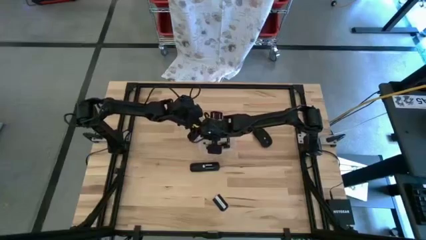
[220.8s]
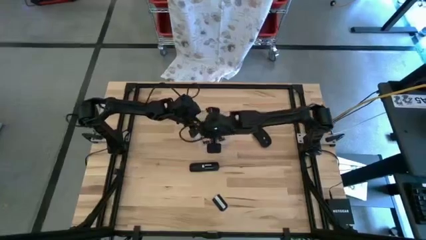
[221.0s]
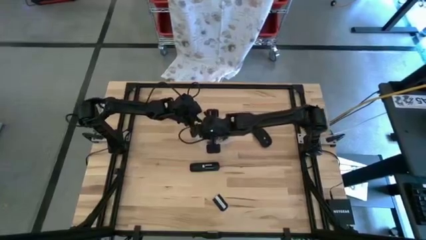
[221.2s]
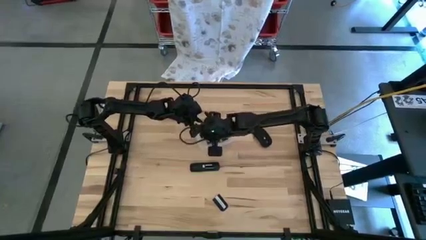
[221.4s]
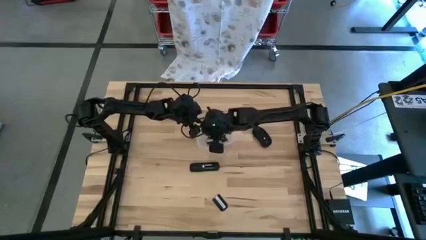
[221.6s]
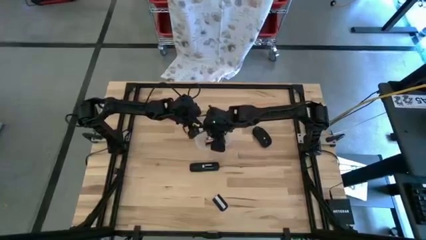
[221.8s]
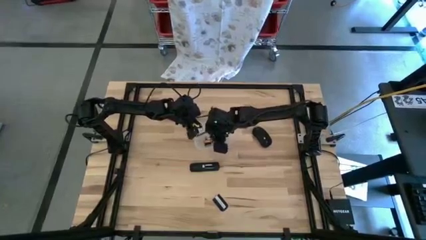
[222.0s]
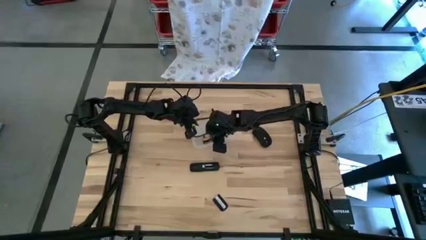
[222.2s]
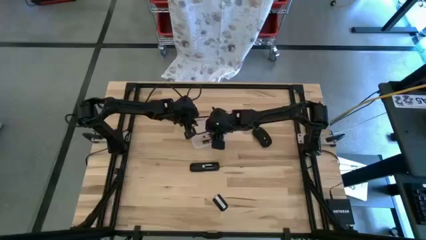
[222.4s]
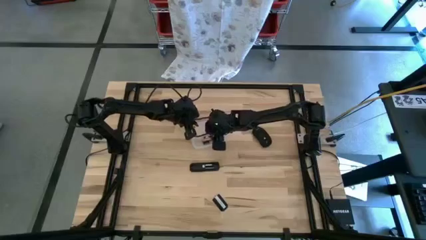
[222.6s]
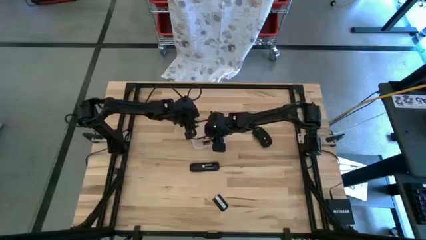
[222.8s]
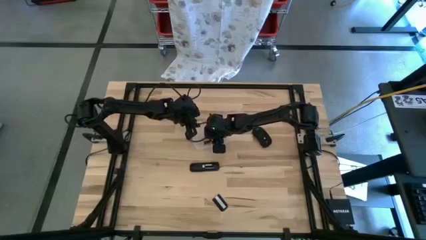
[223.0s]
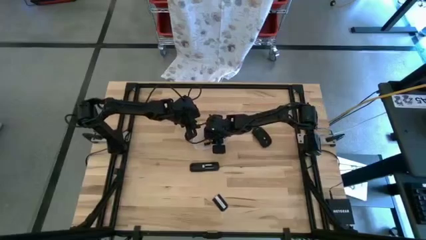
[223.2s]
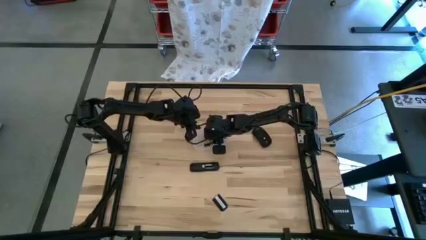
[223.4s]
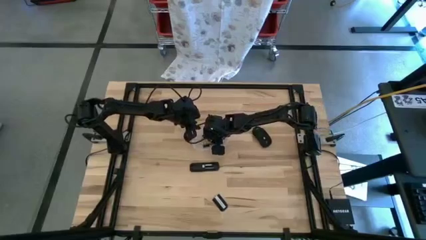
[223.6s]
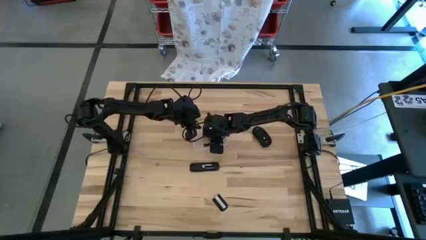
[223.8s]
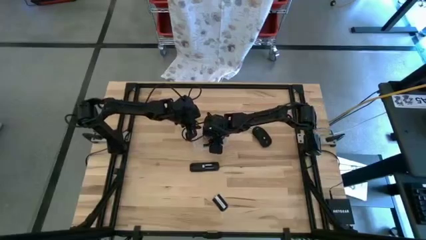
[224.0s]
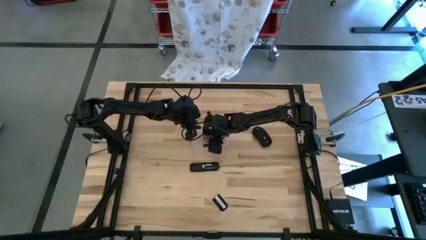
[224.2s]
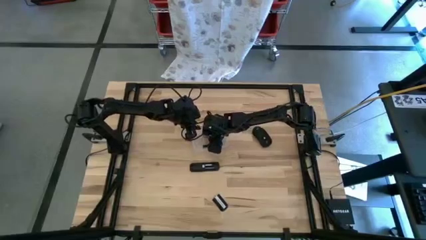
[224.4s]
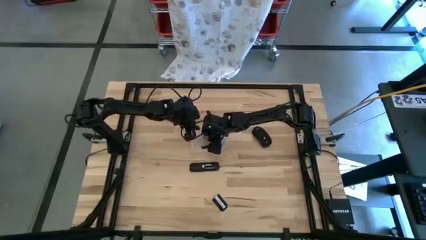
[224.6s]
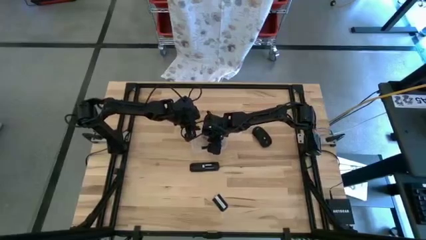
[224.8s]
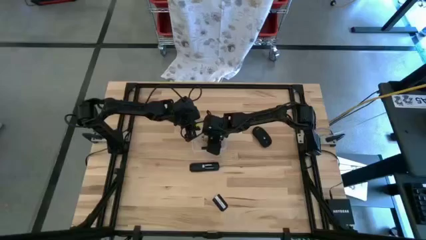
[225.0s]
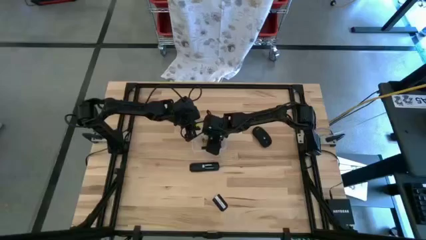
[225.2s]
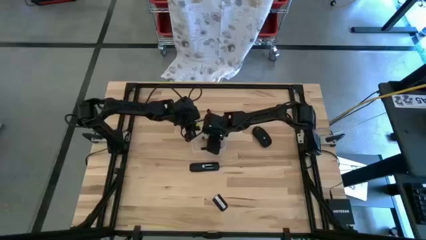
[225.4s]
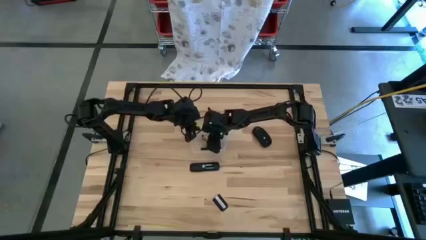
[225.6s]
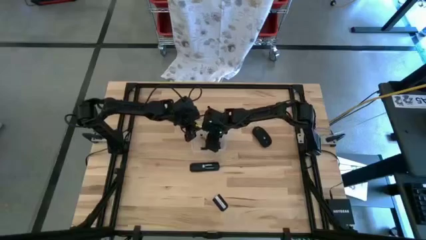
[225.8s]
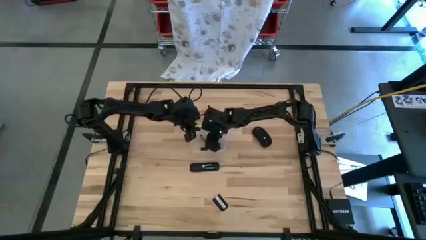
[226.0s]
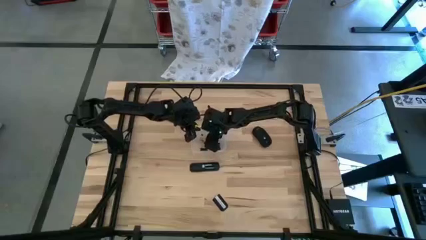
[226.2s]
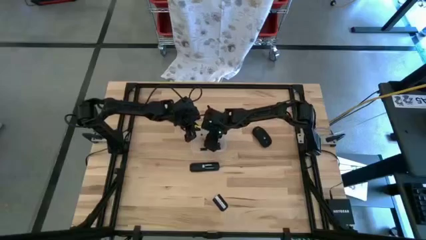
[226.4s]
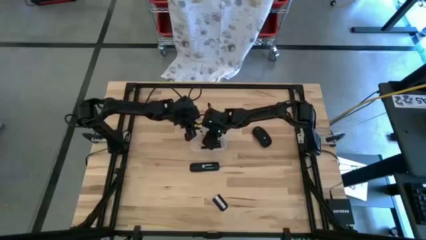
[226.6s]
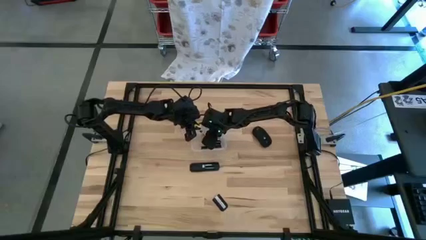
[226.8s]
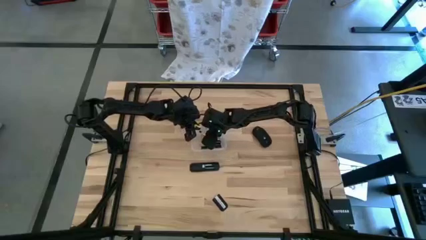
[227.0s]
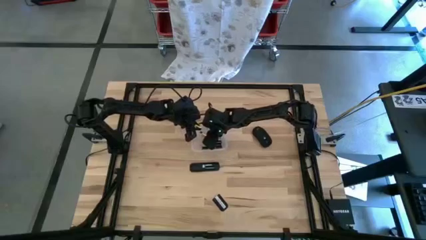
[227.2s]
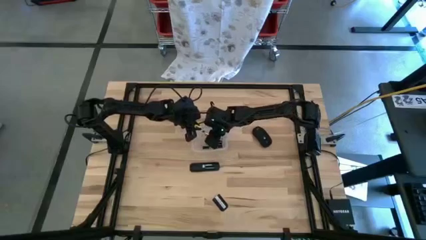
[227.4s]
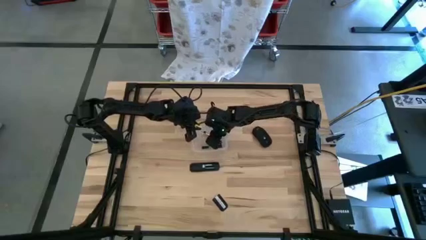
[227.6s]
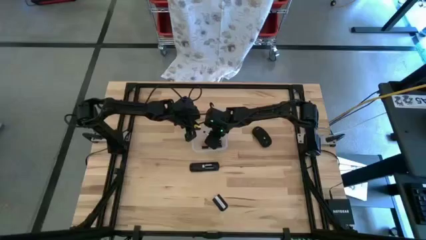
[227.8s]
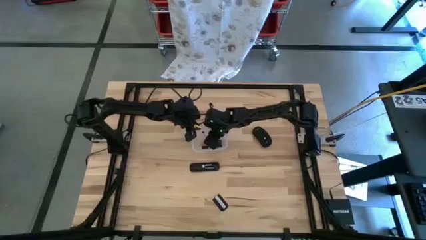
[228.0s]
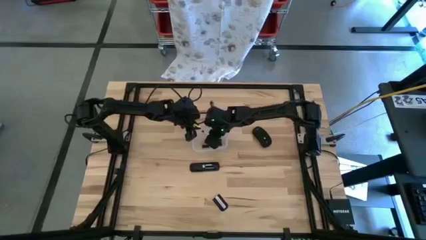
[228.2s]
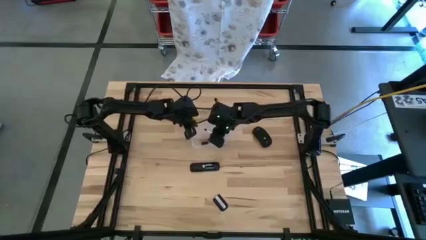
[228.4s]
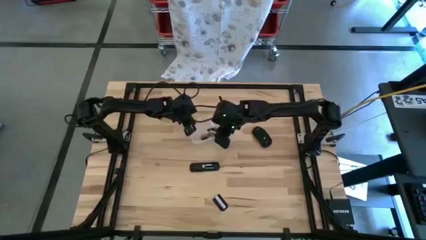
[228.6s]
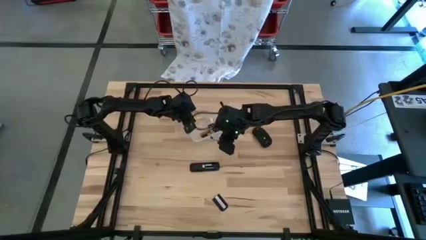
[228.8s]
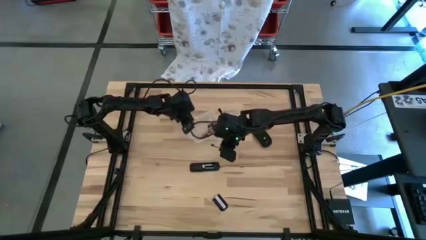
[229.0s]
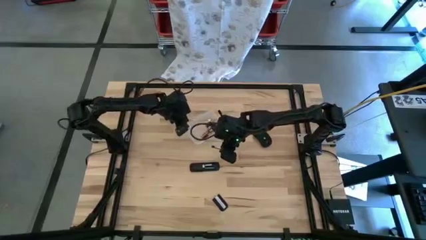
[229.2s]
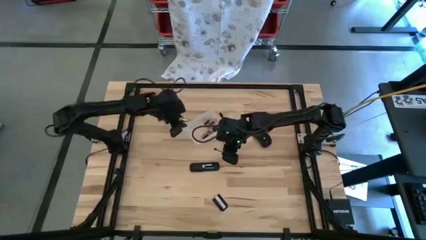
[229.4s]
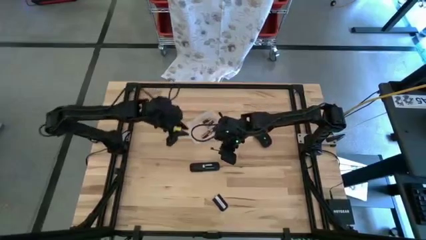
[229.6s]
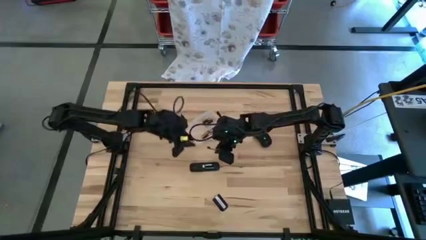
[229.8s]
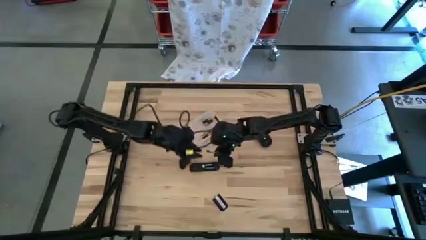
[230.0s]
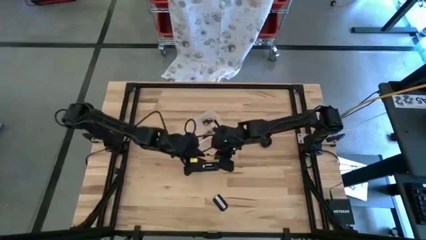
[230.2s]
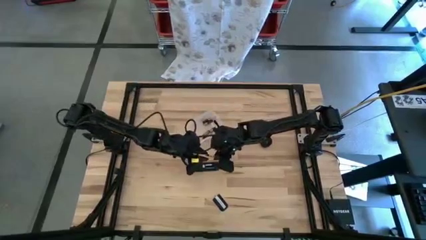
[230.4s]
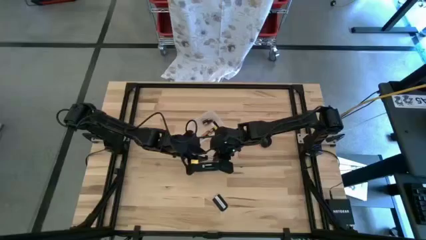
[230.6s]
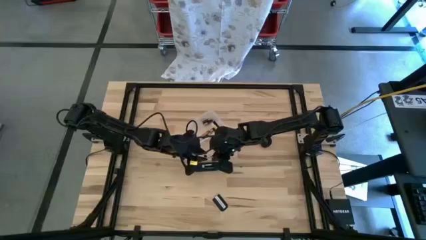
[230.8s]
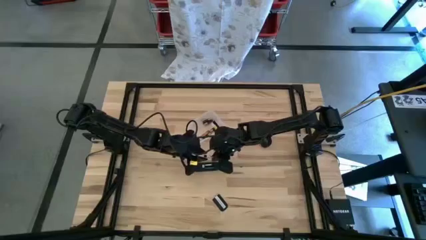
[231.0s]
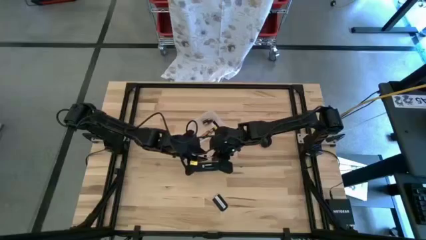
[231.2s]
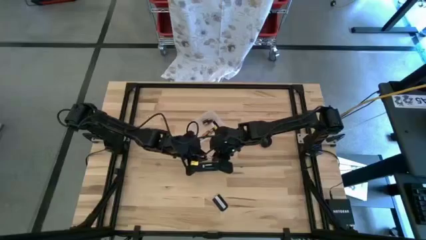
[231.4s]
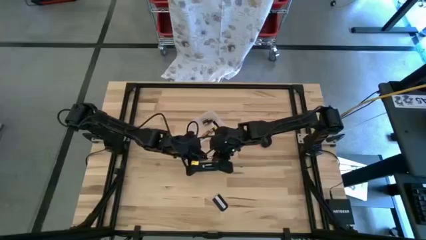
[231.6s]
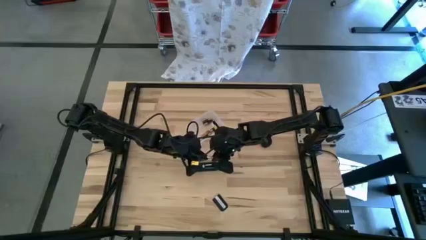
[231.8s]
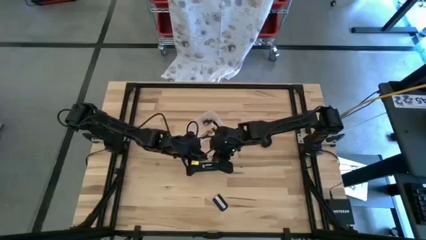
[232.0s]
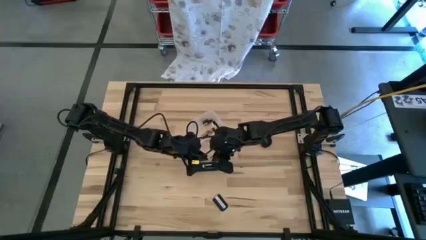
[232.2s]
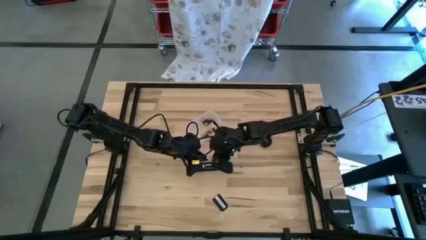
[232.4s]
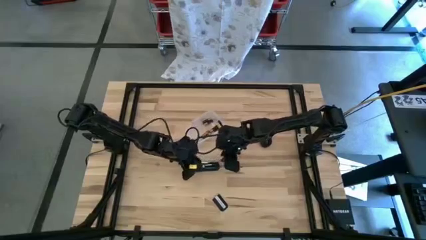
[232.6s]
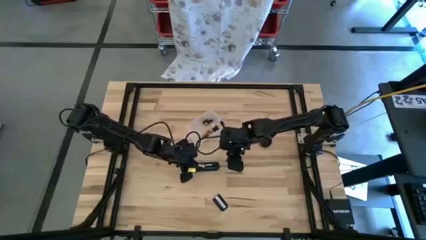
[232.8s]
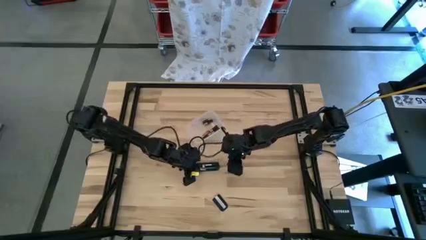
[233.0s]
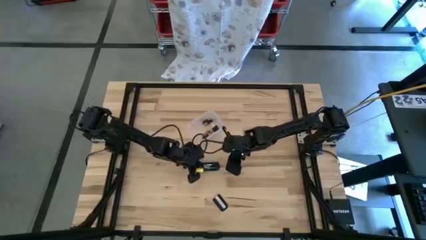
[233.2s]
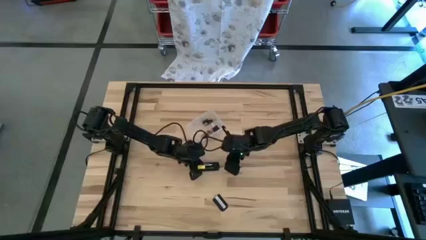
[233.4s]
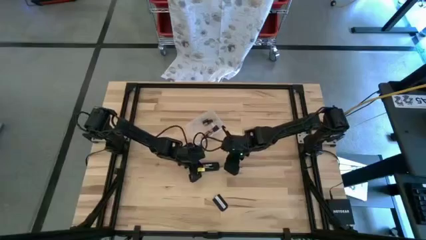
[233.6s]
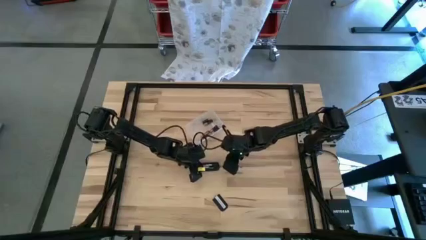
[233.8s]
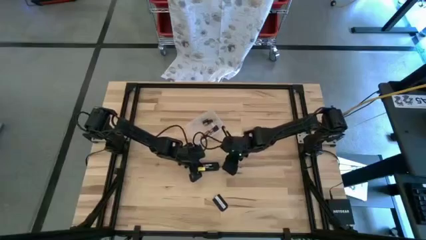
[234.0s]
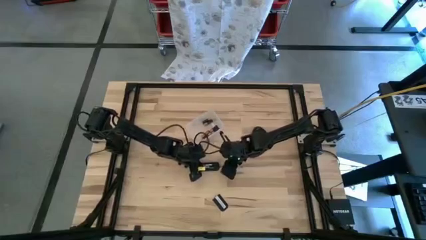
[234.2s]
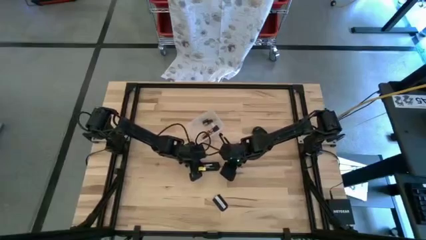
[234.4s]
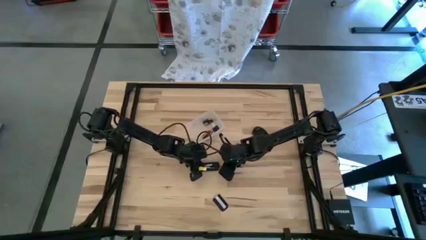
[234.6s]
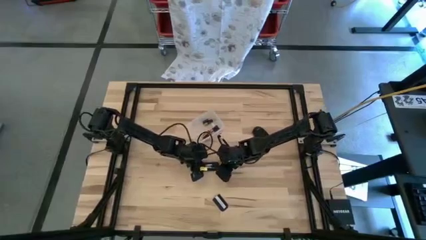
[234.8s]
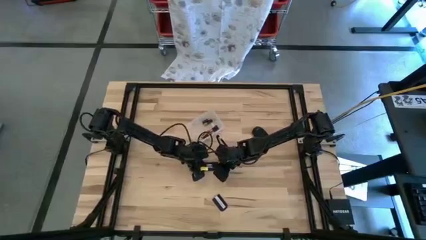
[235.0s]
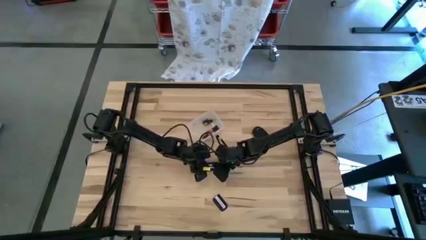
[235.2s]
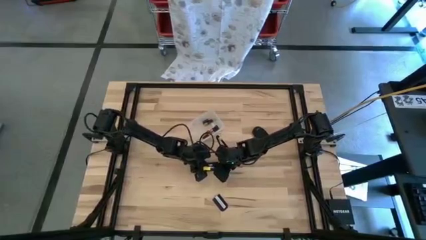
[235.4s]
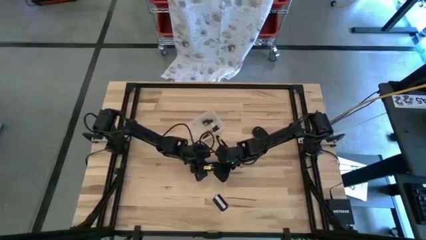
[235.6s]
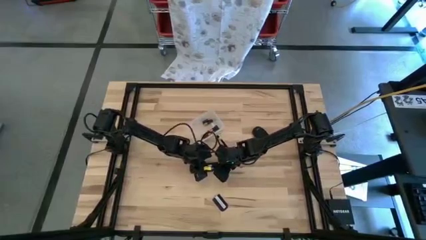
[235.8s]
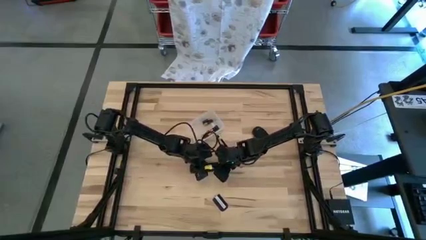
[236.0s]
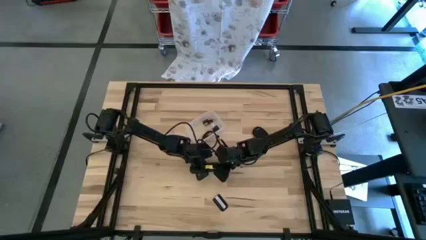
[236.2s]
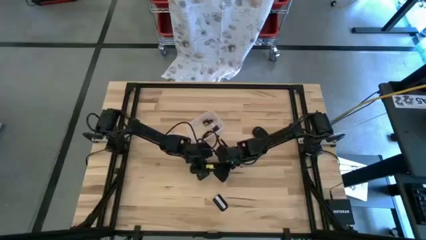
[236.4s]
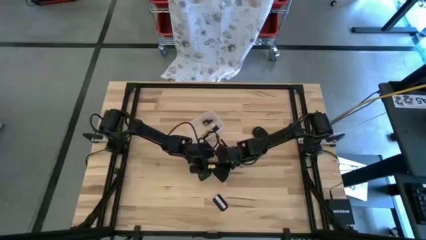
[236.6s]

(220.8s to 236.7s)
Task: Insert battery
Insert the silver battery into the remote
